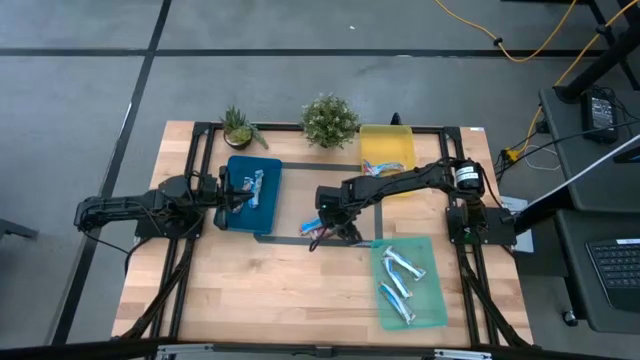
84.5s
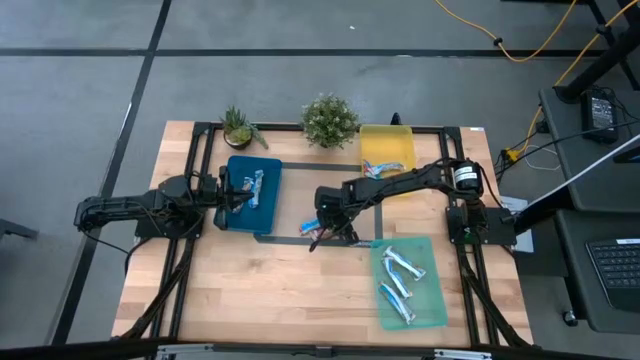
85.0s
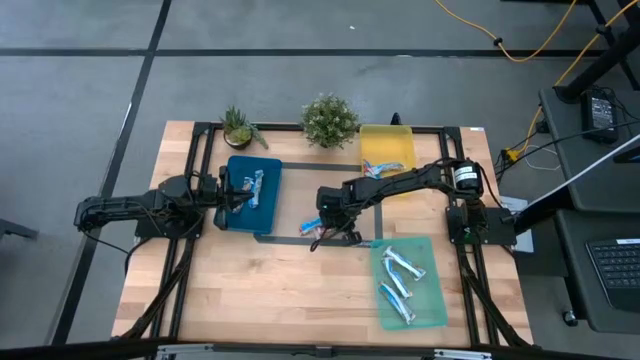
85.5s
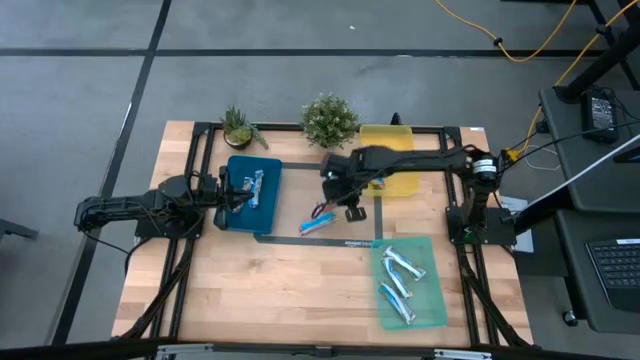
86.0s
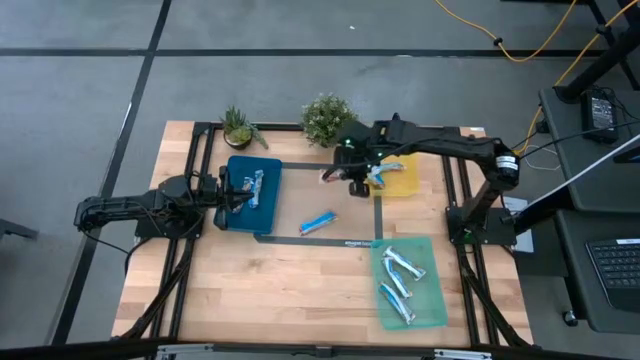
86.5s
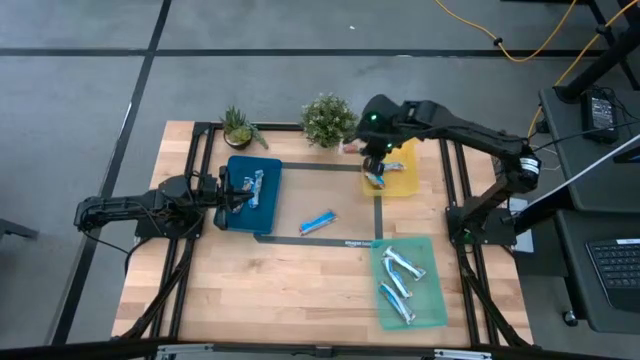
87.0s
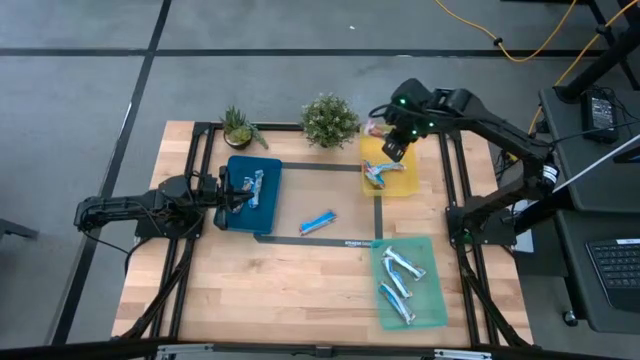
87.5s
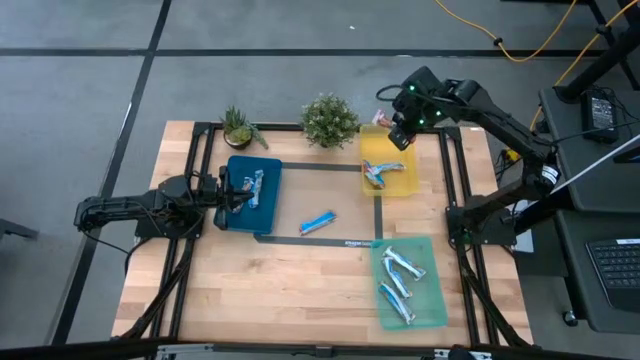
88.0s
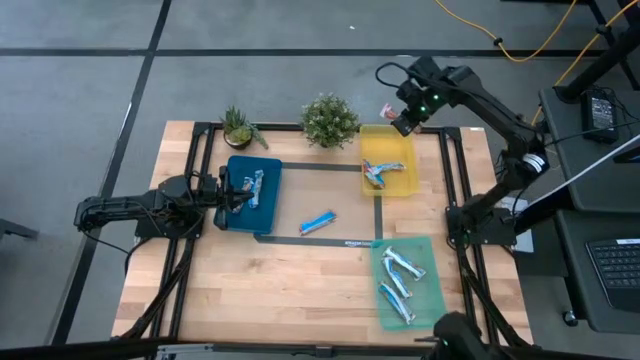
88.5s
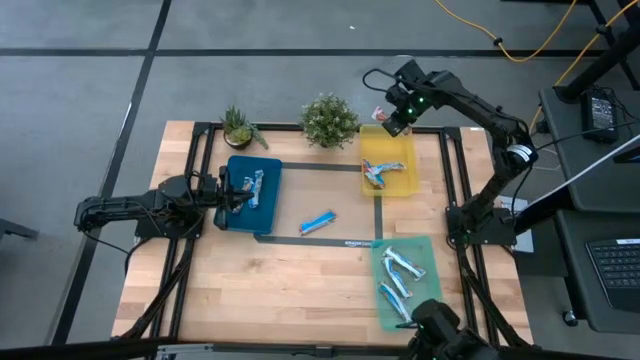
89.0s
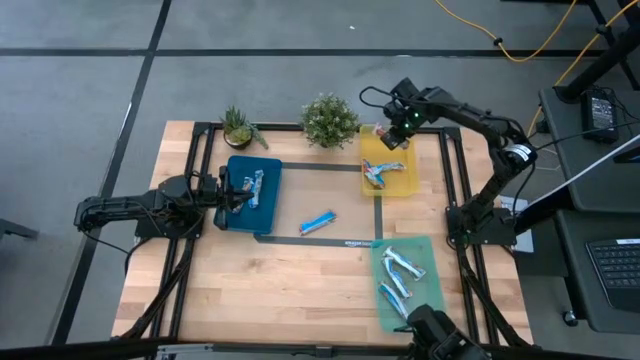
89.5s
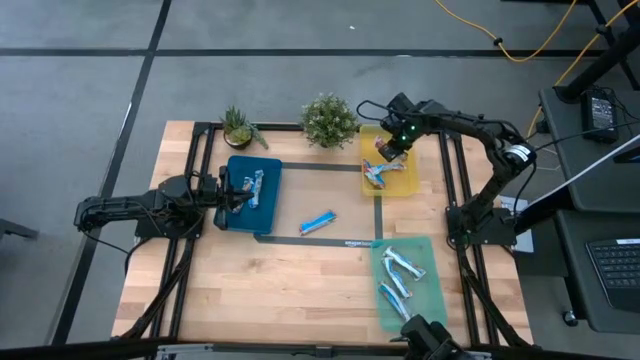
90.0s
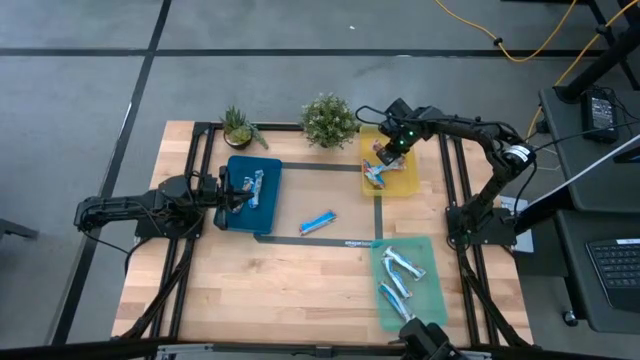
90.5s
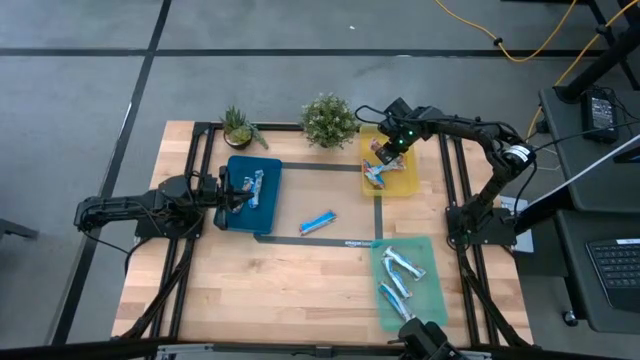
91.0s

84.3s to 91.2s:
Task: Pick and place Granola Bars by type
Put the red granola bar into the yellow bin

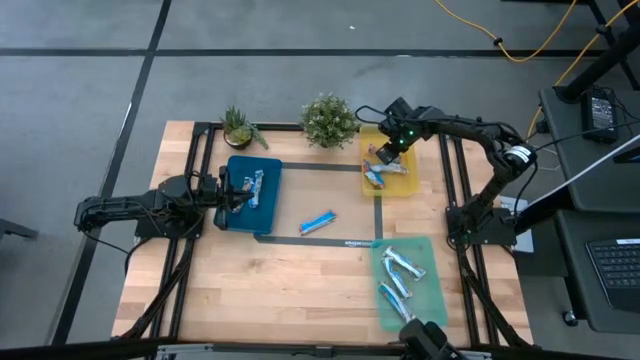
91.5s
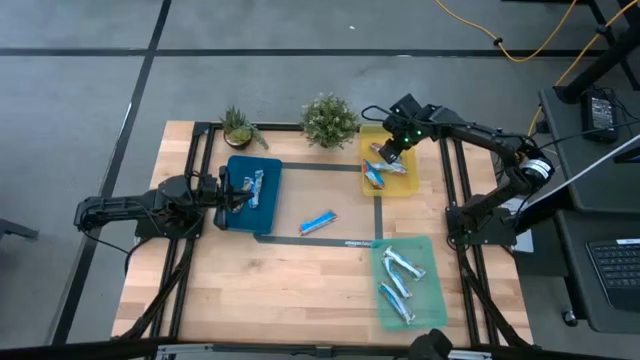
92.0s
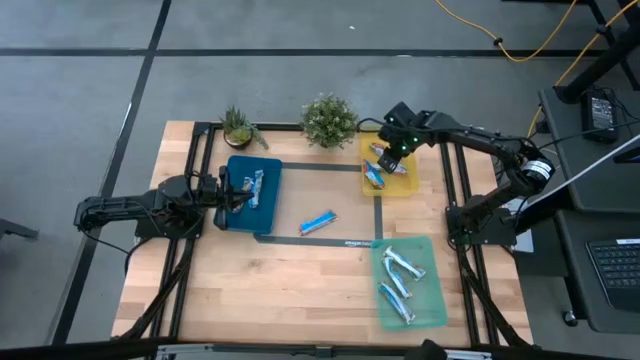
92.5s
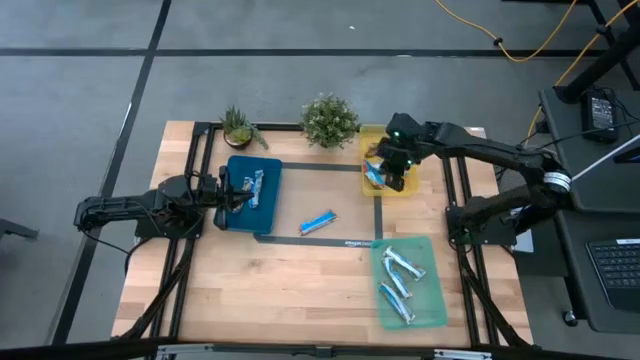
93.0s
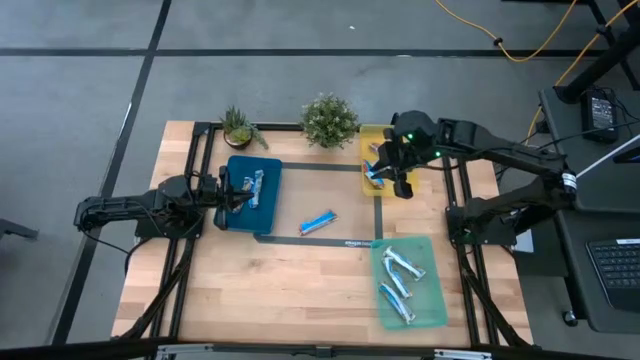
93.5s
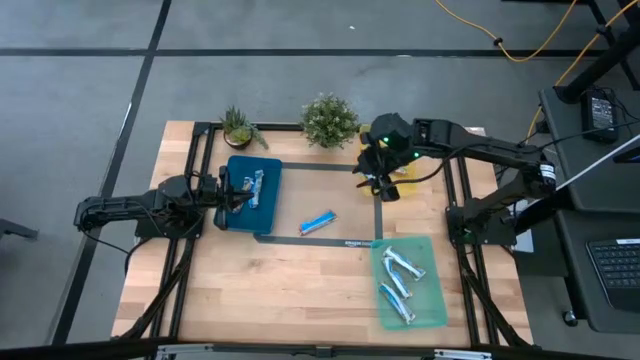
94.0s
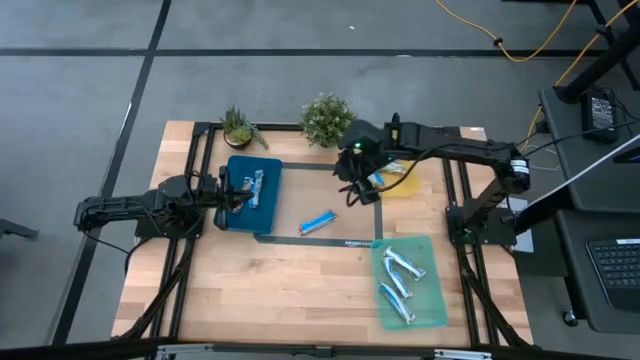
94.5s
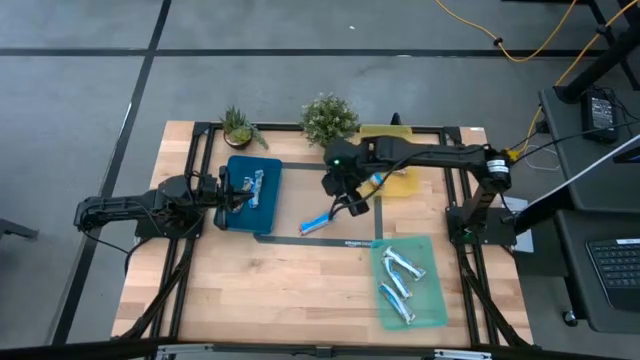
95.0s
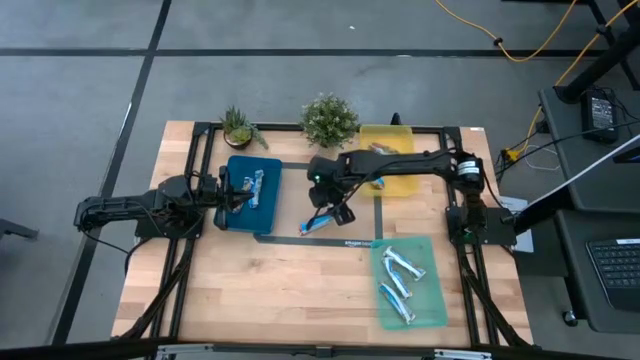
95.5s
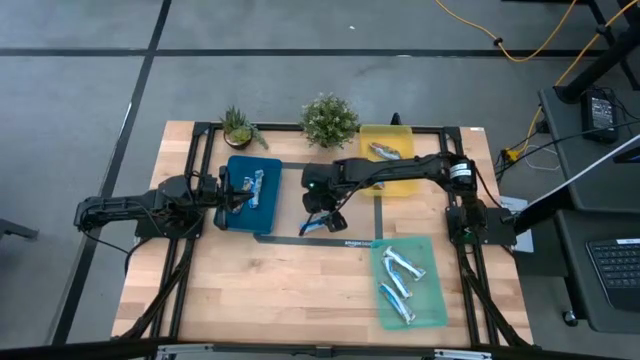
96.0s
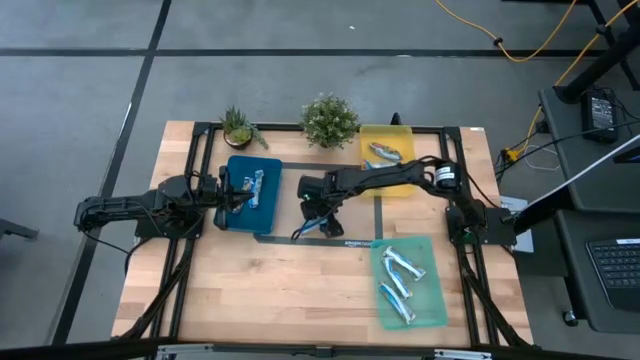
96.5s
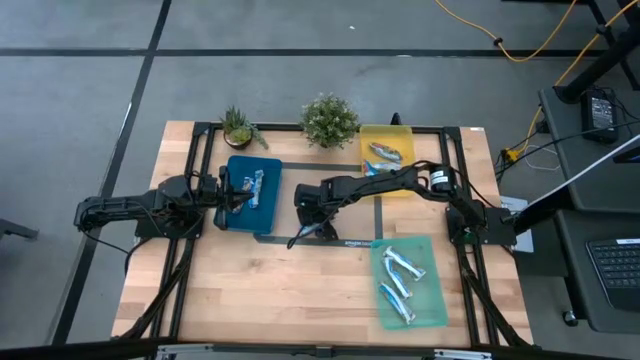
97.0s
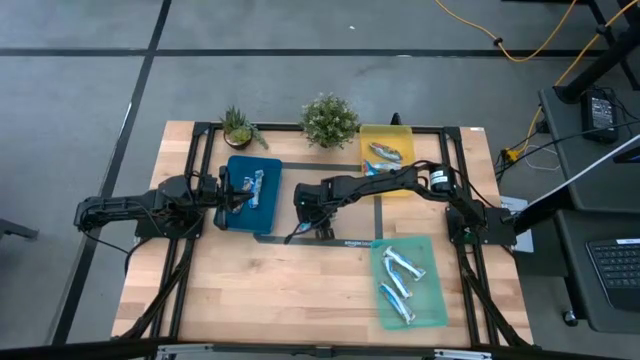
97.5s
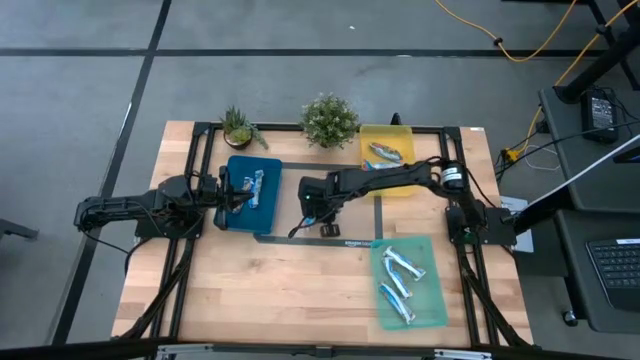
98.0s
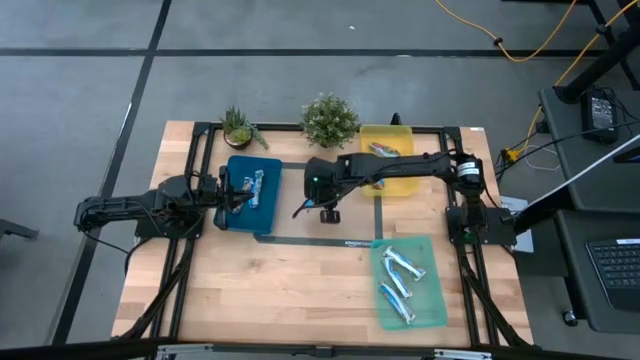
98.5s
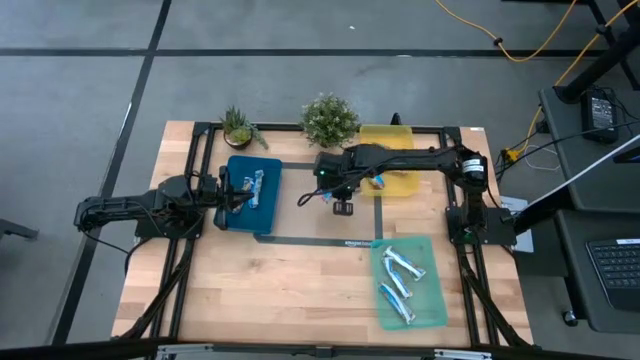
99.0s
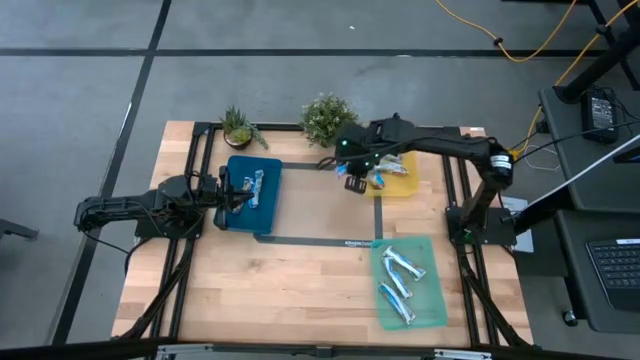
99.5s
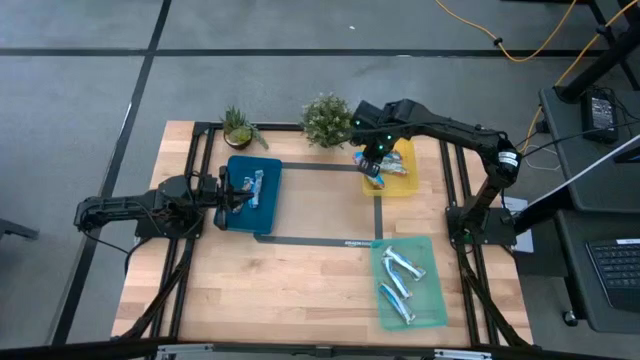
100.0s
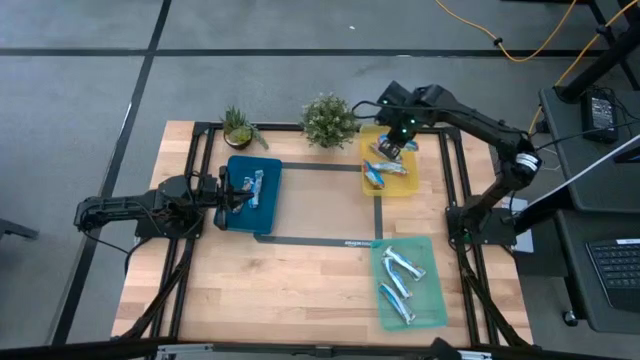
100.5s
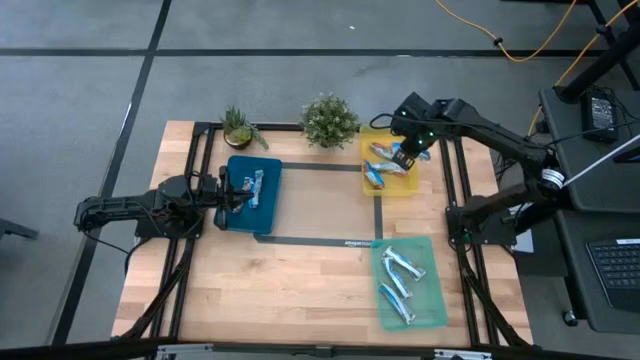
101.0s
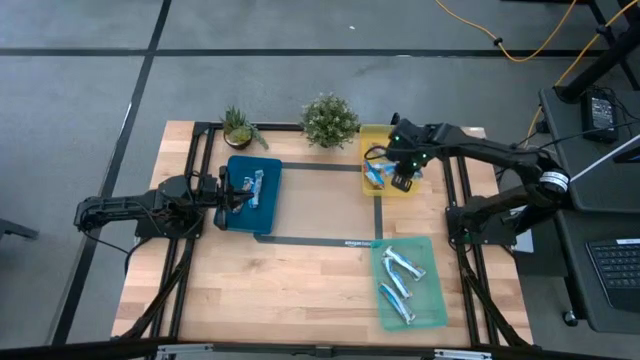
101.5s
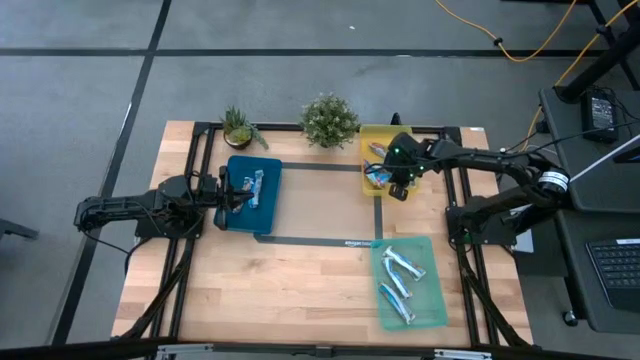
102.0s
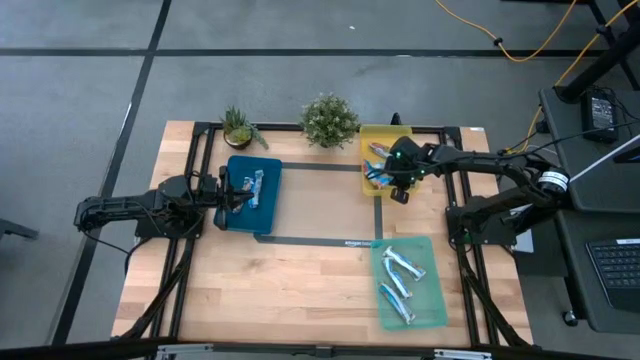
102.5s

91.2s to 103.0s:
Put the red granola bar into the yellow bin

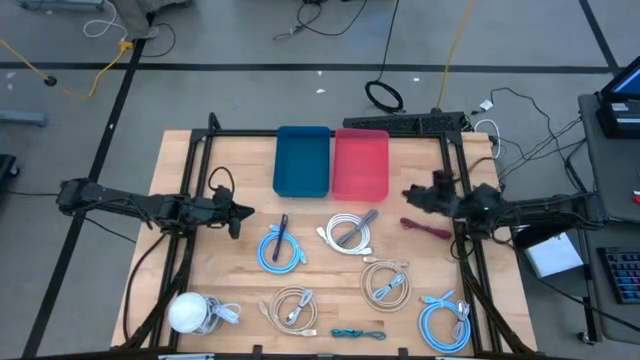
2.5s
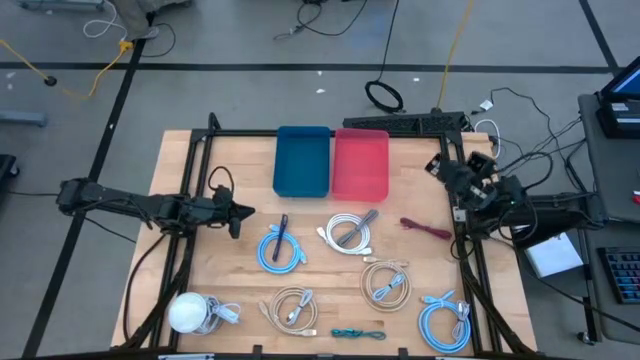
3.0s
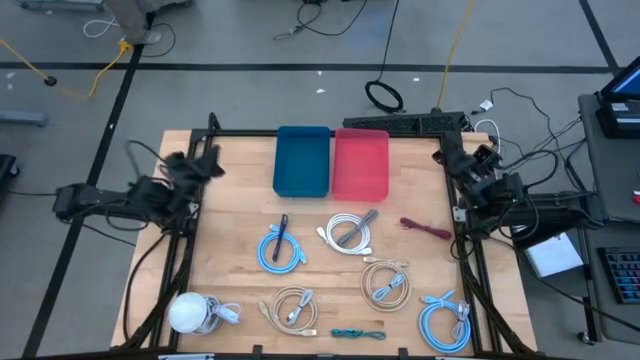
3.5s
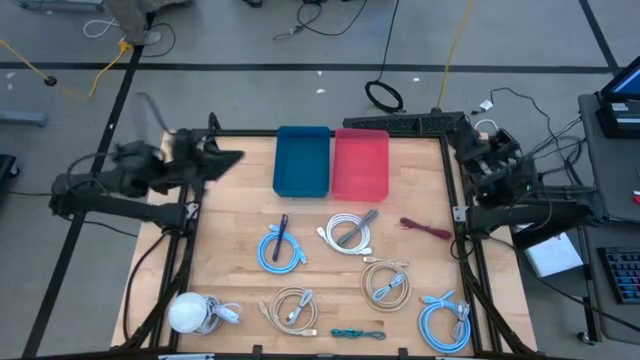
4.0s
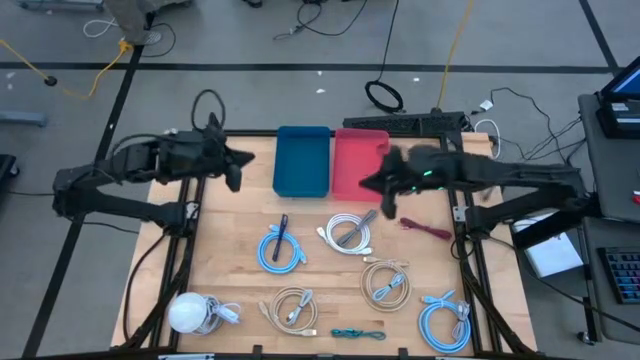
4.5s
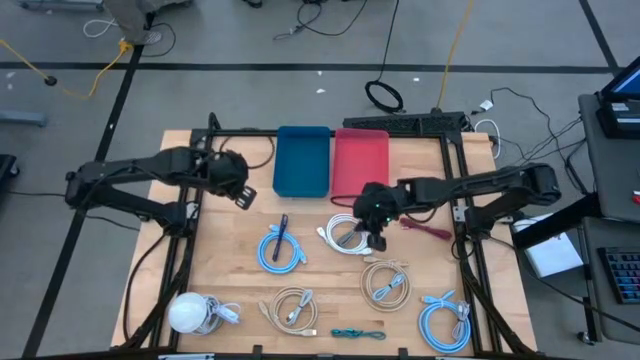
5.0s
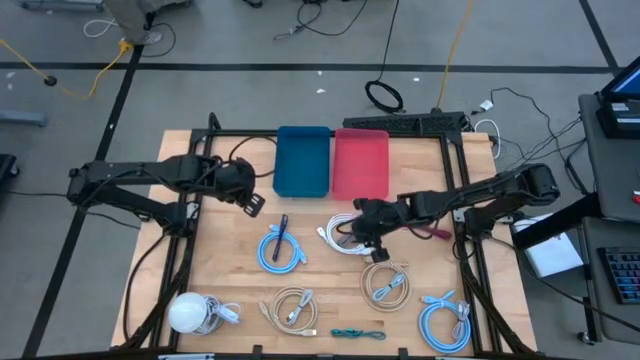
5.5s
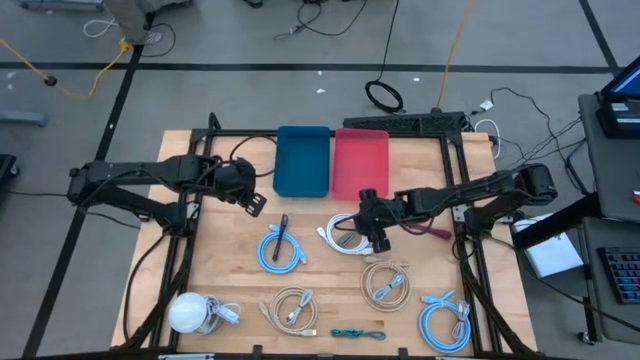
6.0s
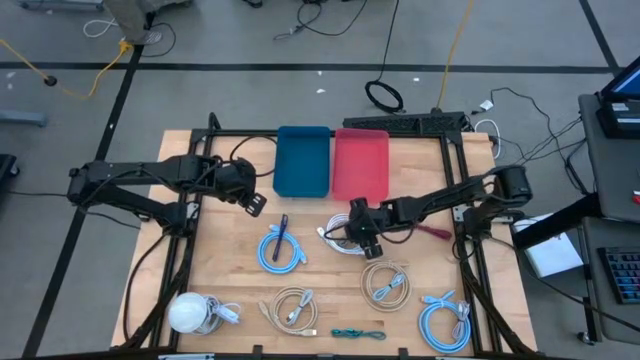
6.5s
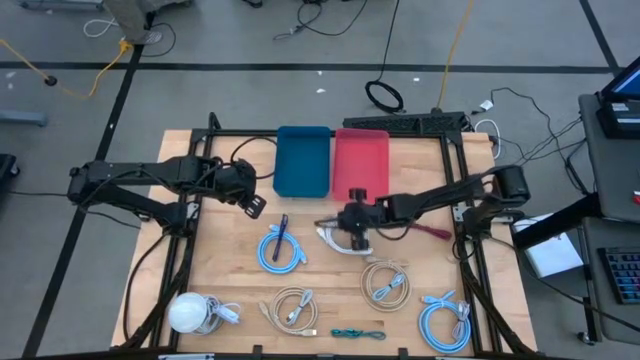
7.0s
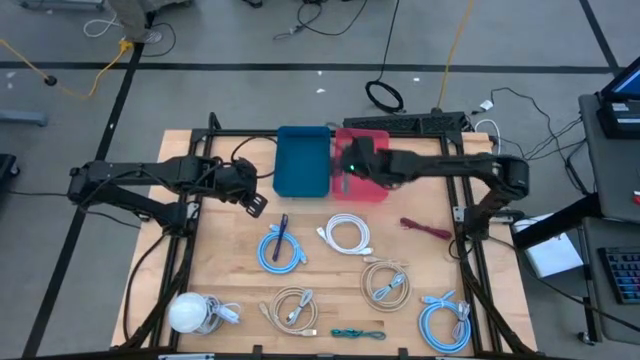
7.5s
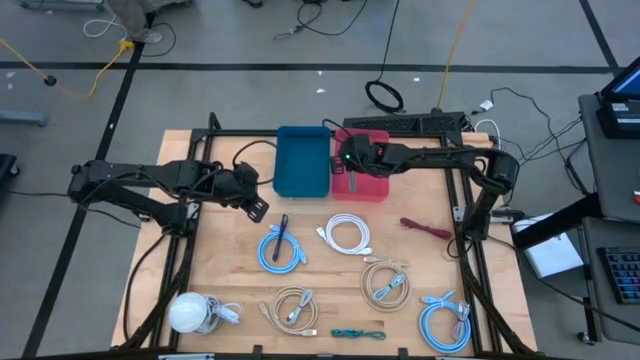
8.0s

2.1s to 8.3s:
Task: Pick & Place USB Port
Put the small black and white charger cable into the pink bin
